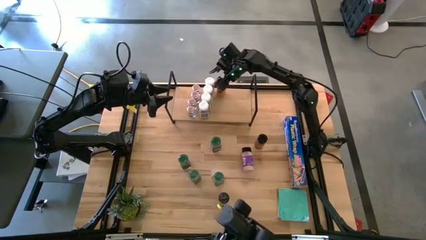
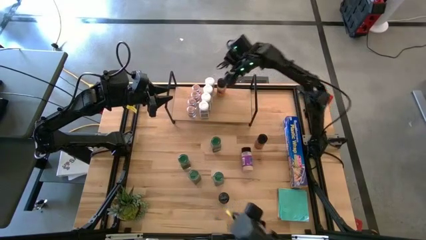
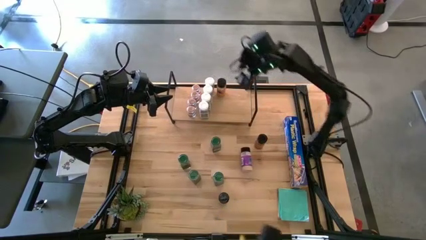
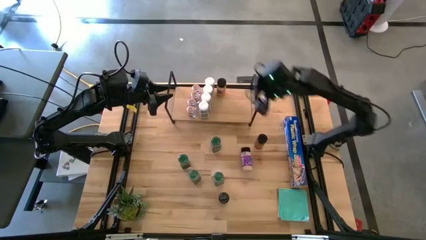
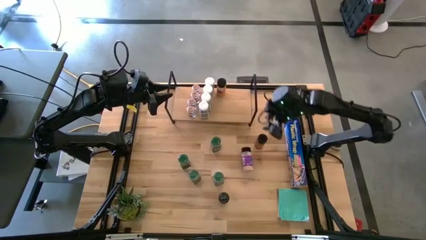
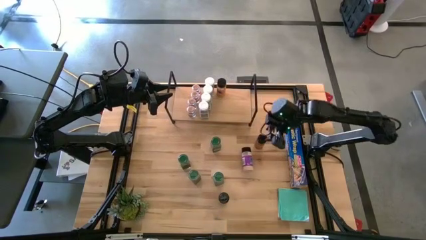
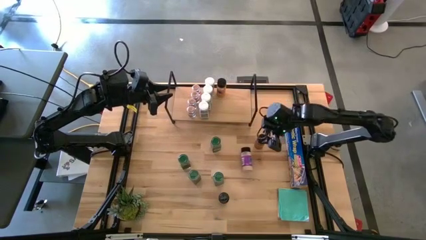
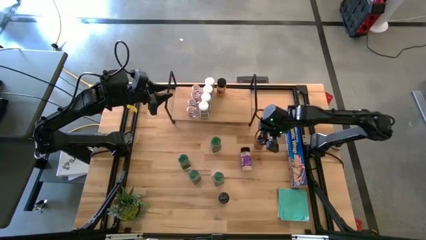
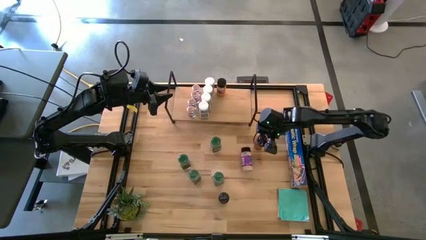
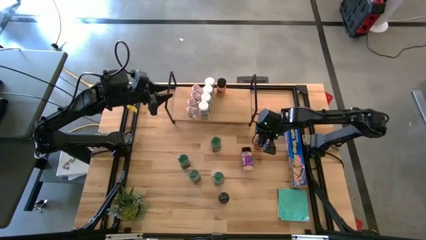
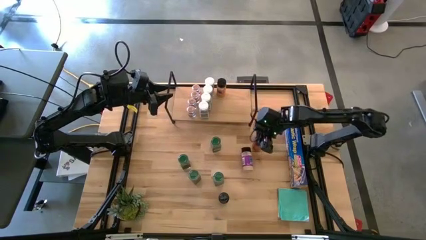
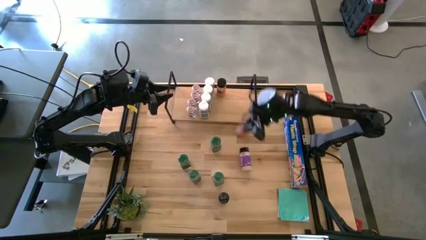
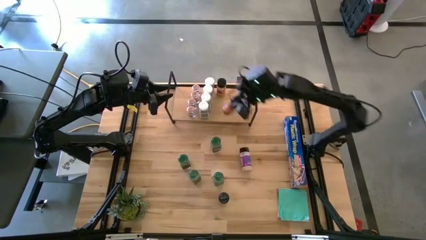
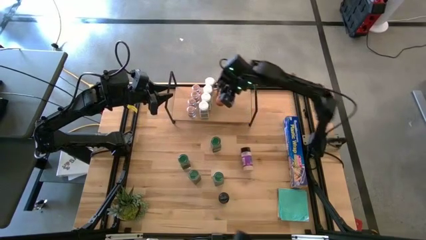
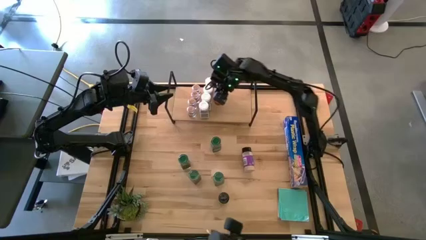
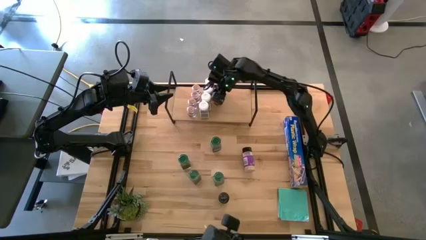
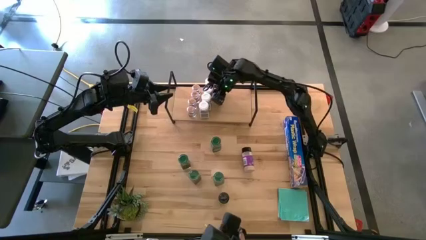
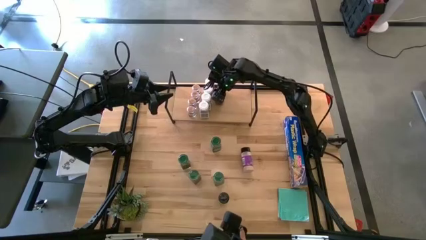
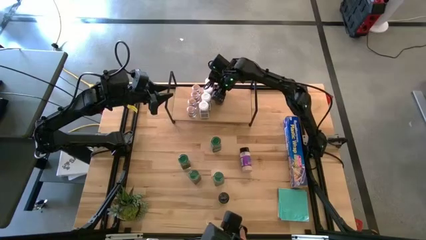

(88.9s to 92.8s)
Task: Shelf spices
Put the top black seasoning bottle on the shelf aligned with the other black seasoning bottle

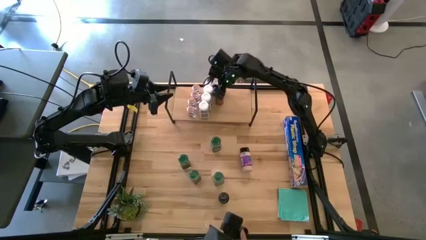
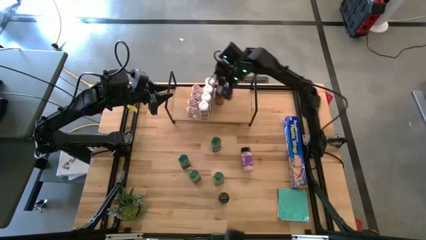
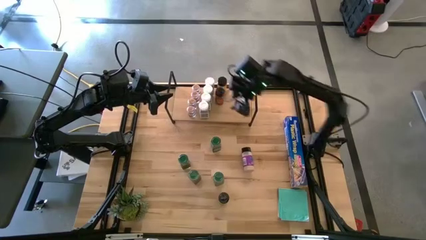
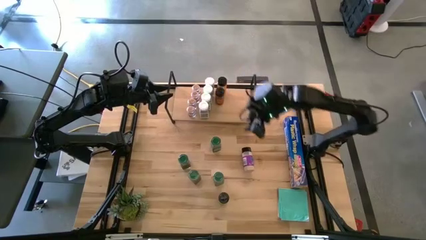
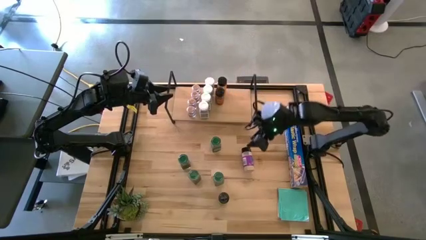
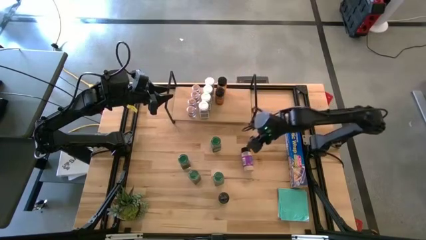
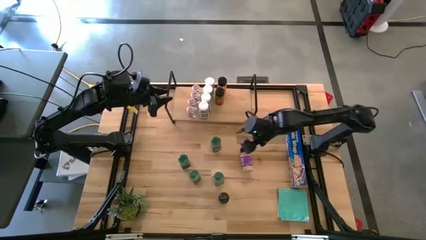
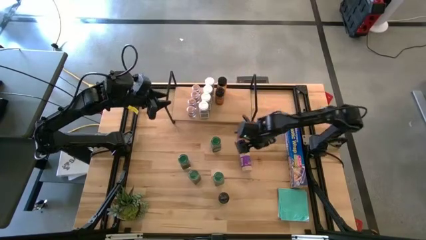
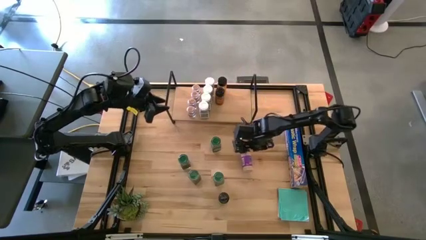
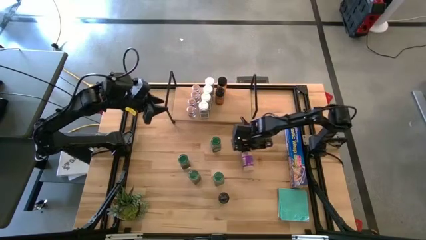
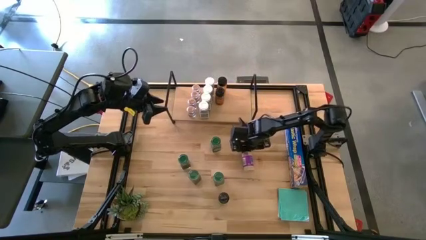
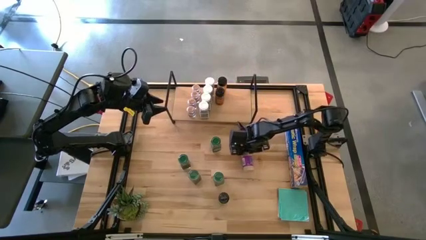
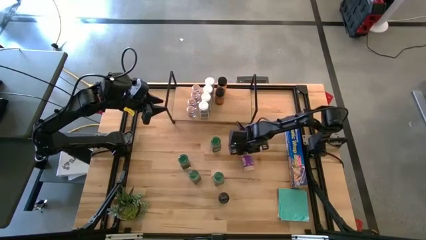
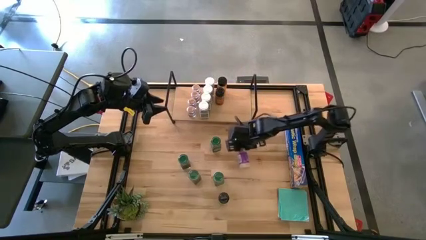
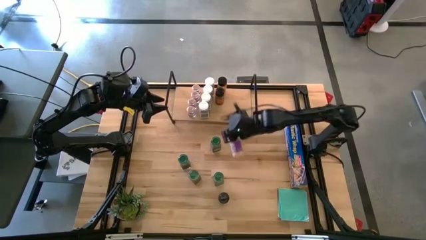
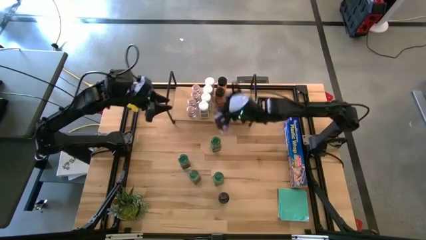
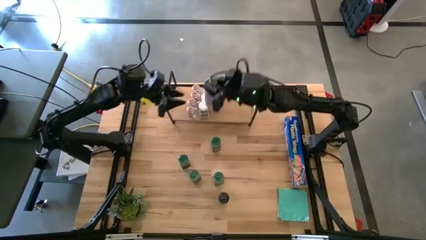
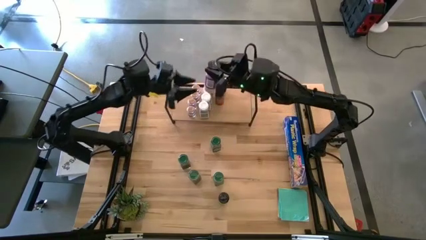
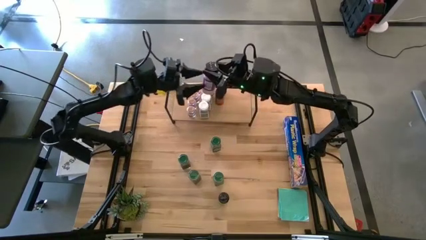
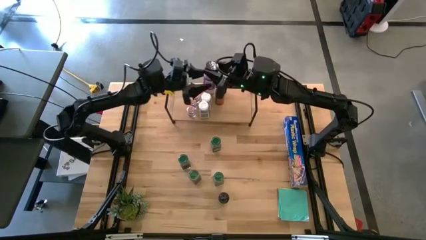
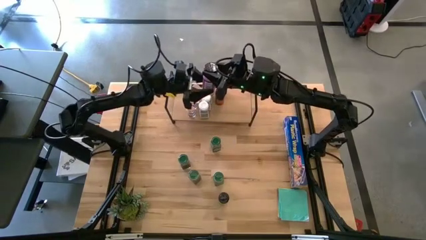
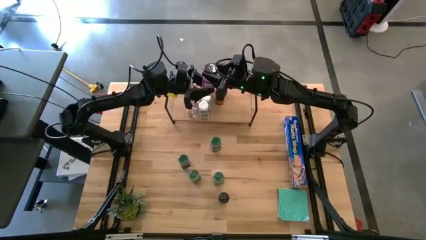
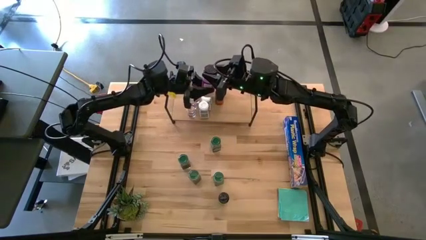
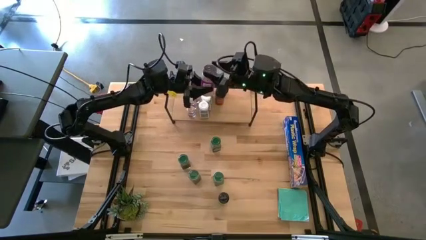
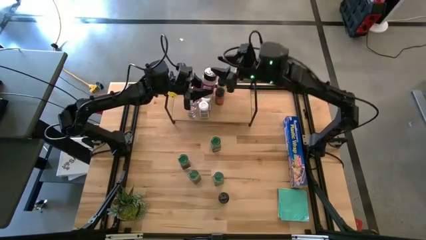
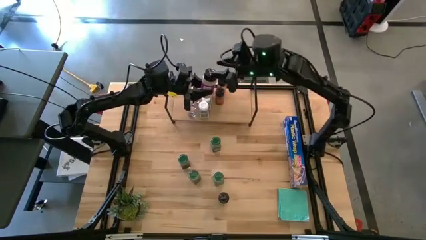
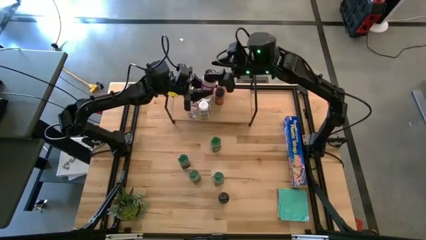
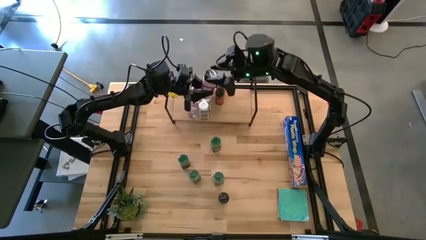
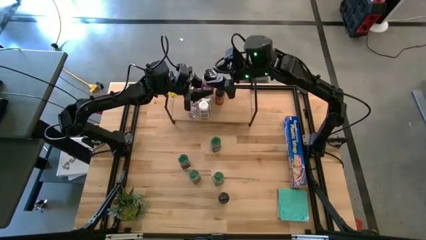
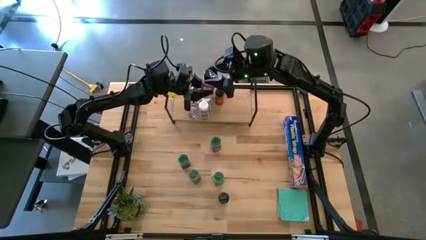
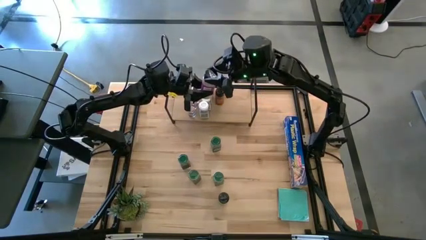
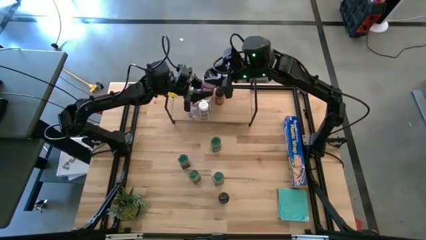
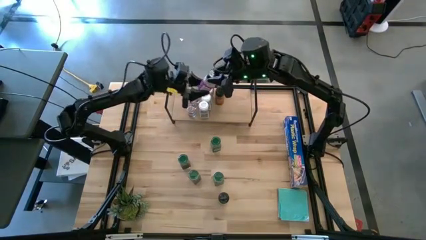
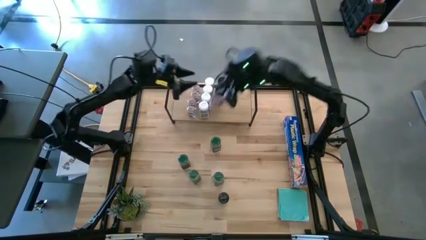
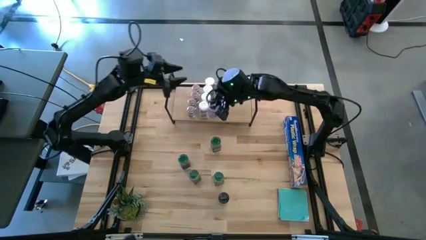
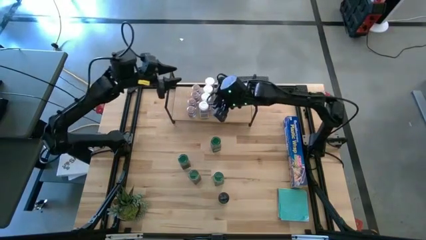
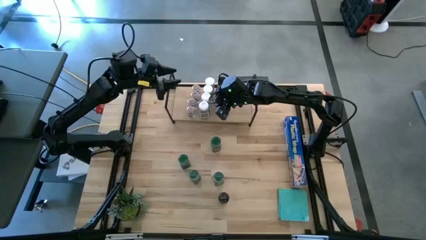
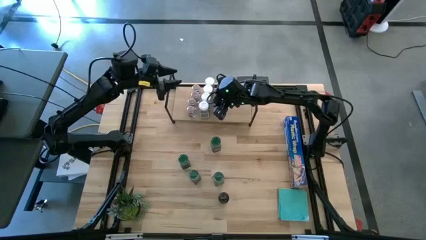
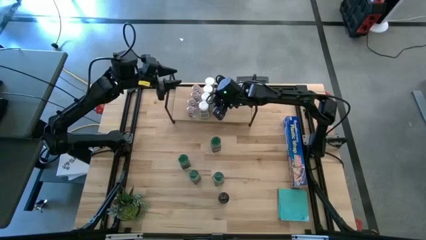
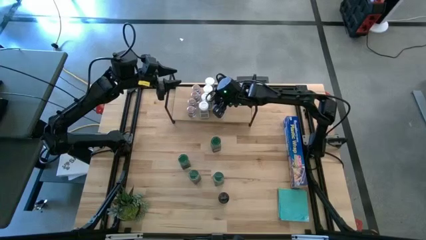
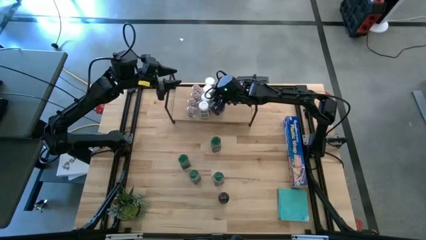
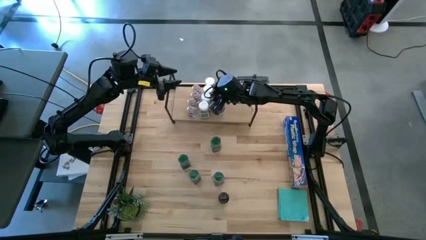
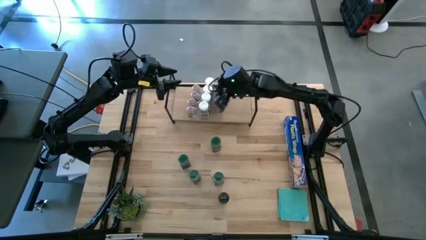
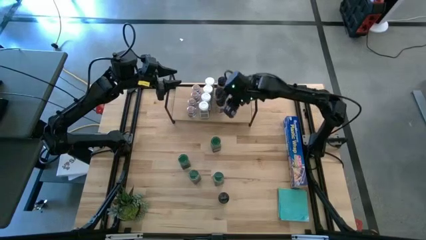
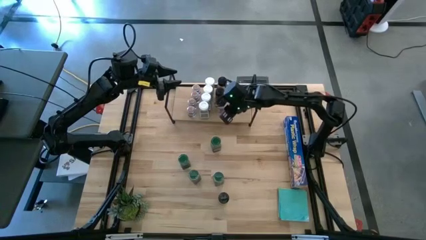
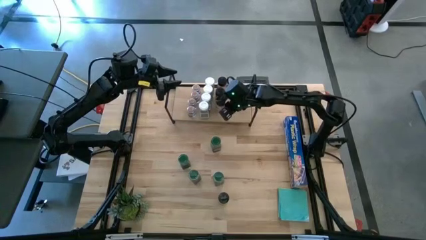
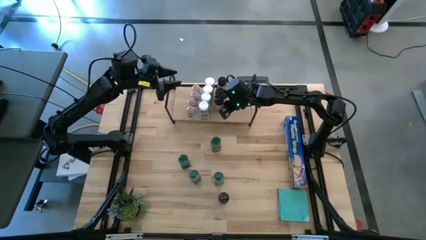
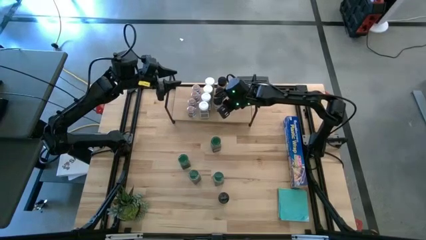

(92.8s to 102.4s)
Put the top black seasoning bottle on the shelf aligned with the other black seasoning bottle

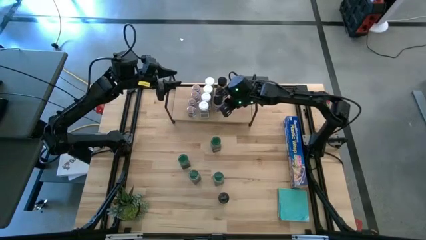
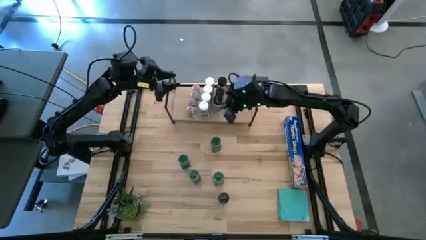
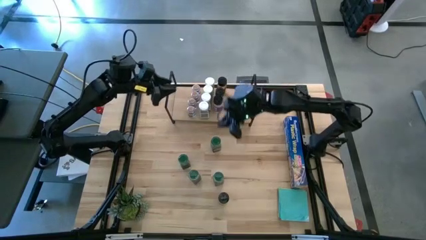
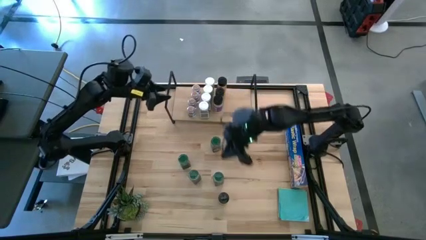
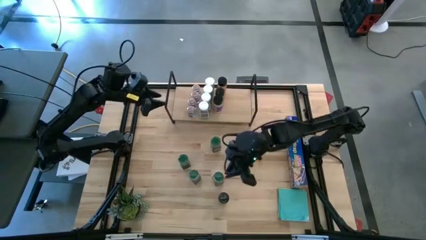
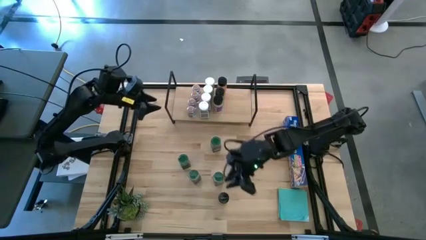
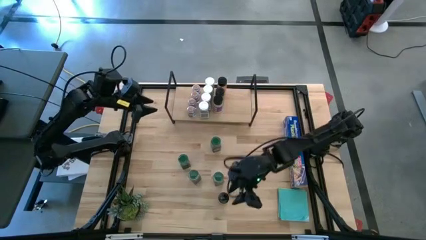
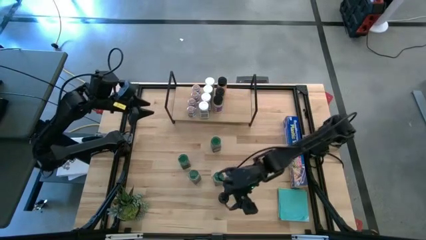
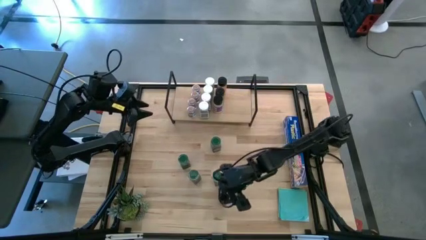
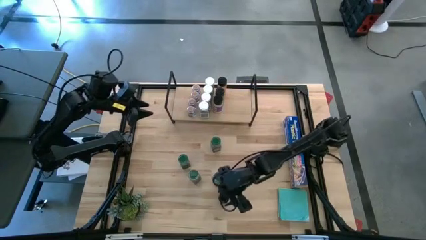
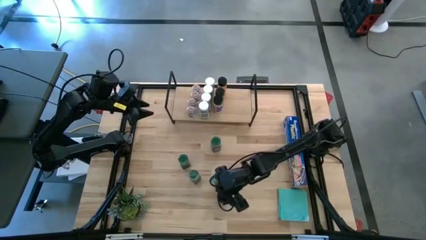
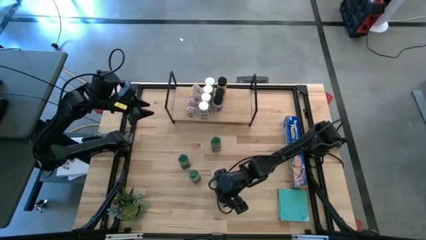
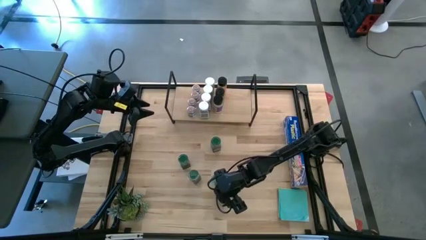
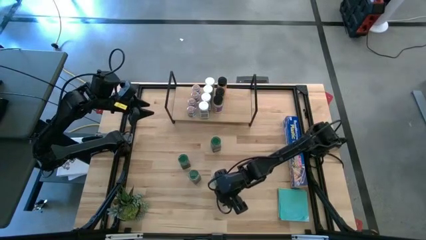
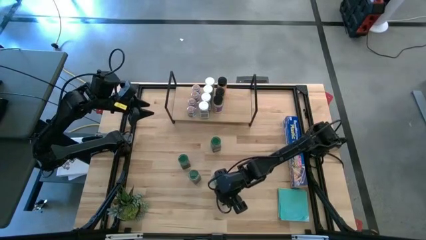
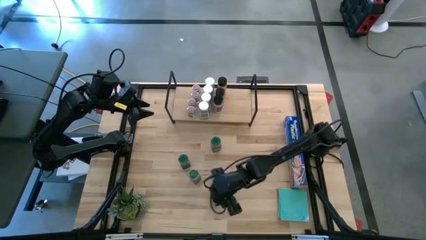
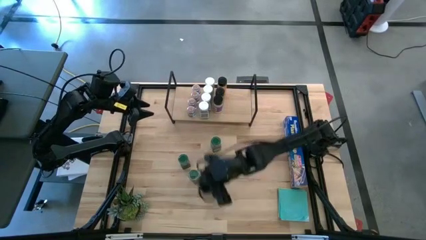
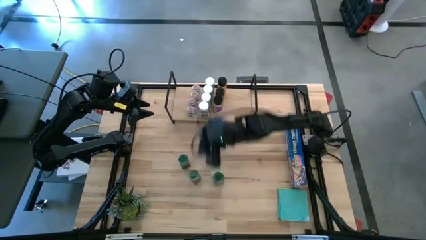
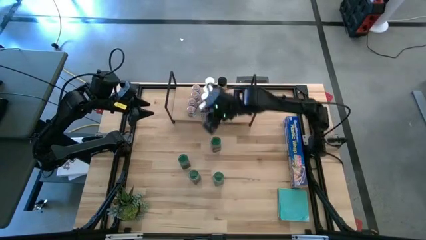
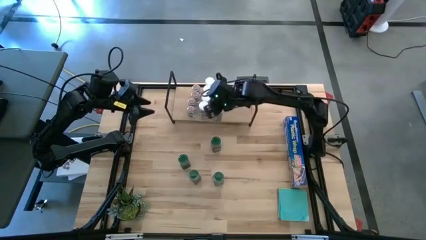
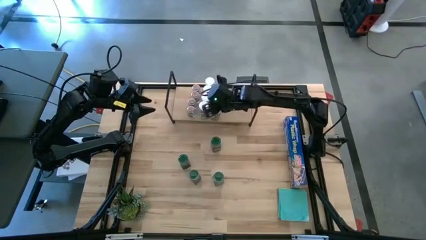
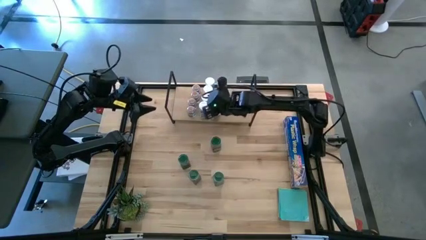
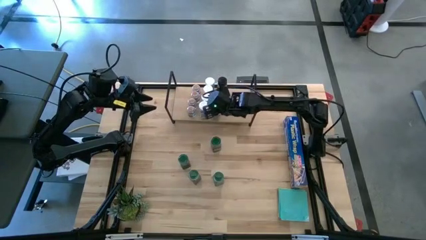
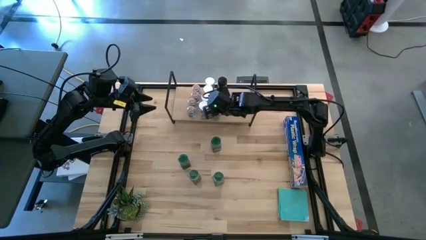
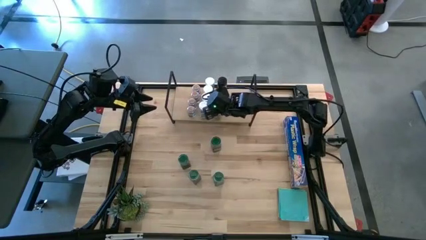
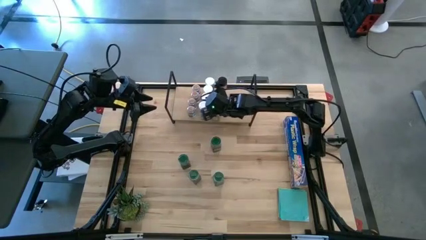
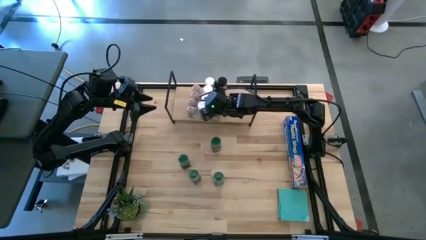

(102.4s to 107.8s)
Put the black seasoning bottle on the shelf aligned with the other black seasoning bottle
